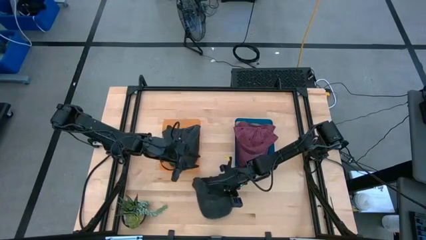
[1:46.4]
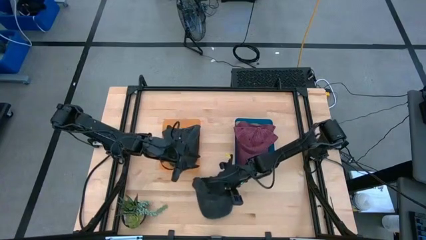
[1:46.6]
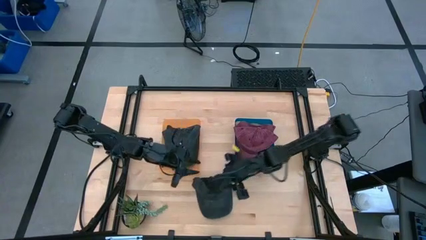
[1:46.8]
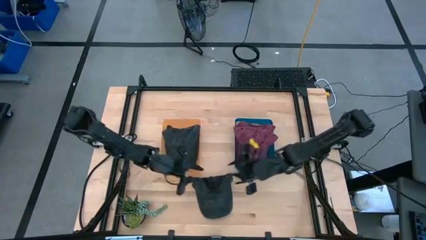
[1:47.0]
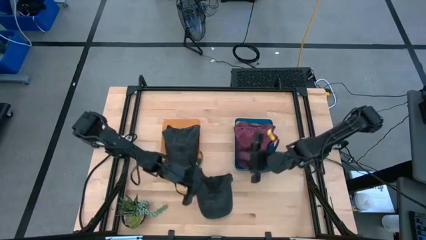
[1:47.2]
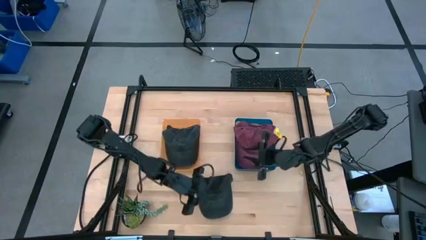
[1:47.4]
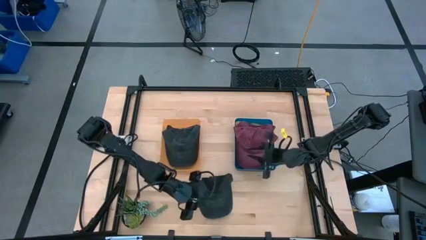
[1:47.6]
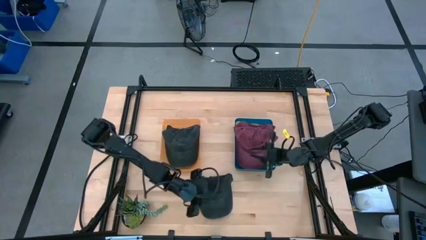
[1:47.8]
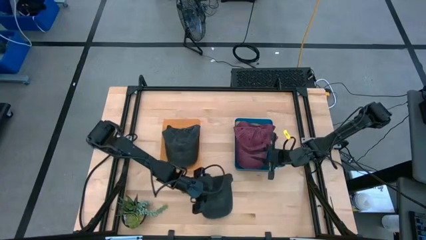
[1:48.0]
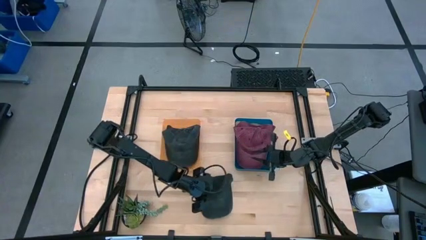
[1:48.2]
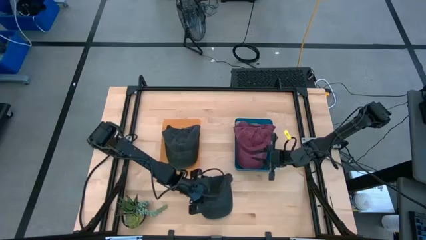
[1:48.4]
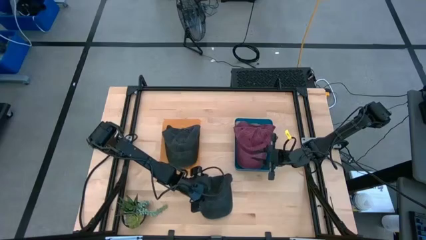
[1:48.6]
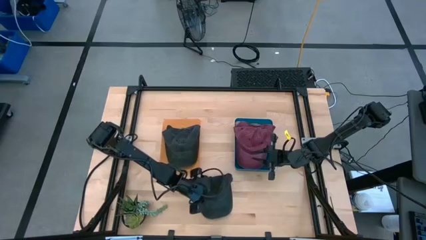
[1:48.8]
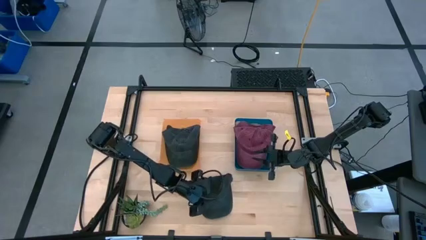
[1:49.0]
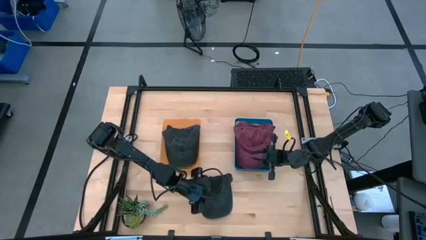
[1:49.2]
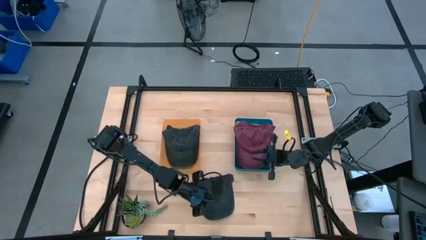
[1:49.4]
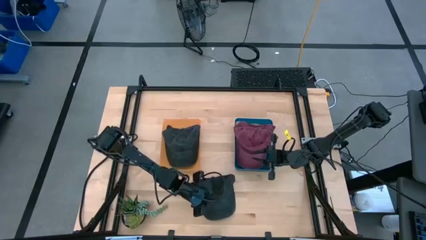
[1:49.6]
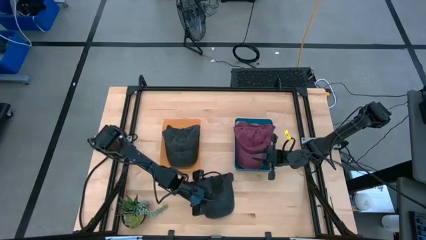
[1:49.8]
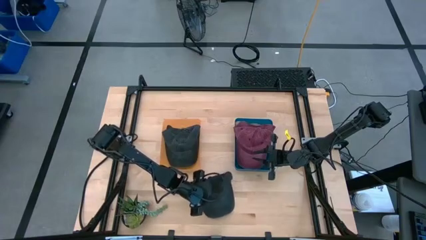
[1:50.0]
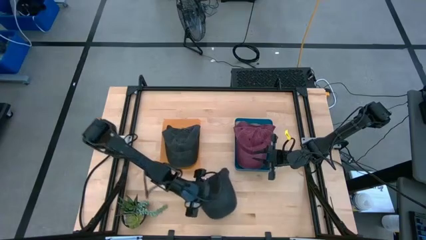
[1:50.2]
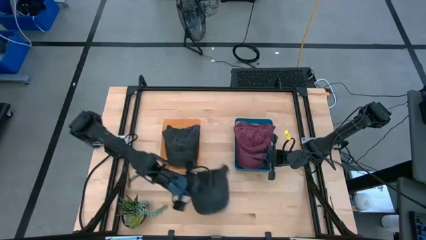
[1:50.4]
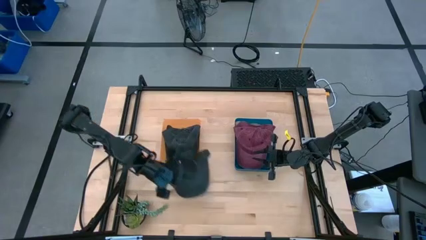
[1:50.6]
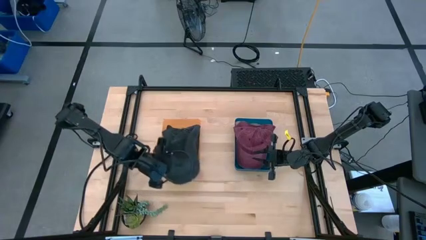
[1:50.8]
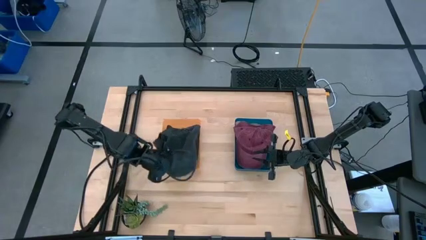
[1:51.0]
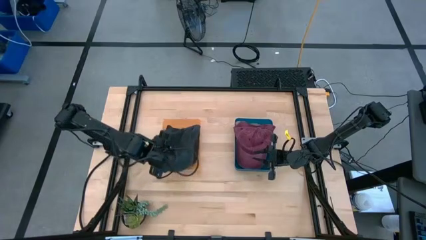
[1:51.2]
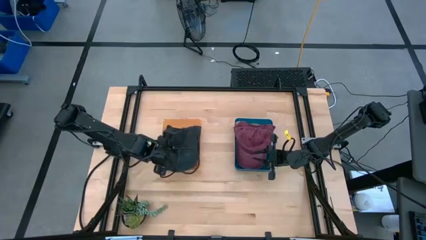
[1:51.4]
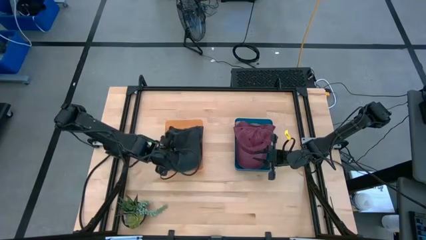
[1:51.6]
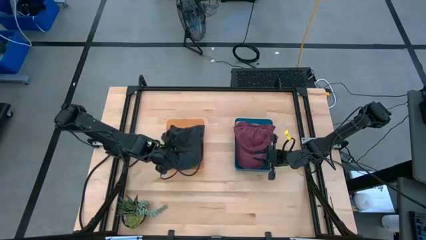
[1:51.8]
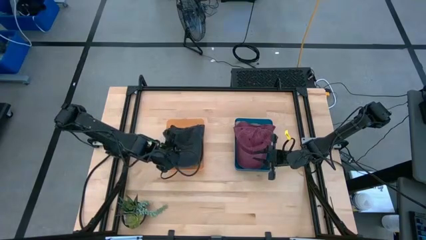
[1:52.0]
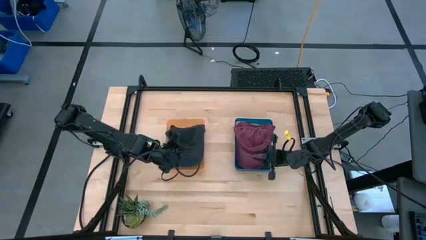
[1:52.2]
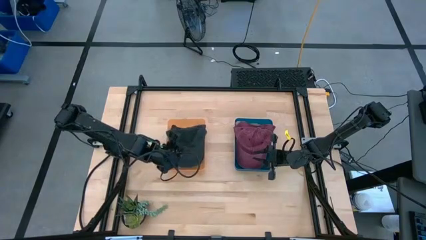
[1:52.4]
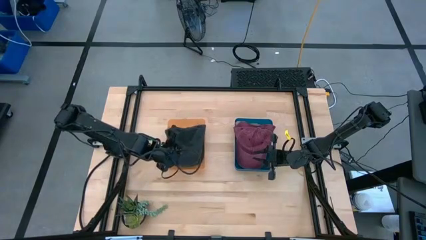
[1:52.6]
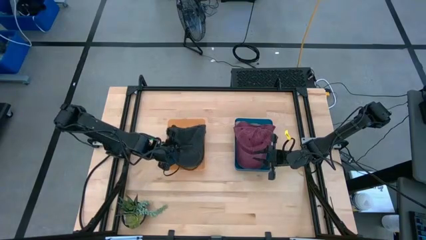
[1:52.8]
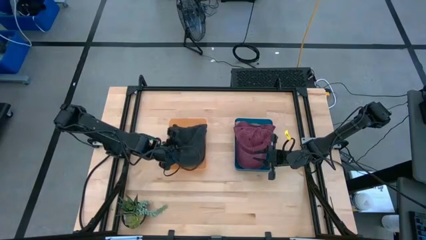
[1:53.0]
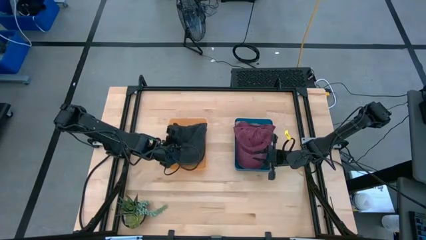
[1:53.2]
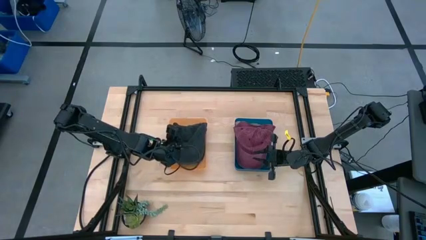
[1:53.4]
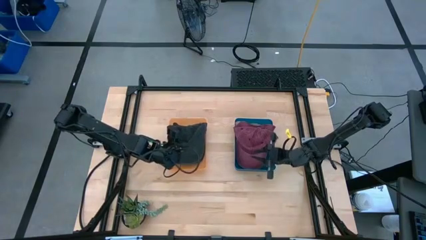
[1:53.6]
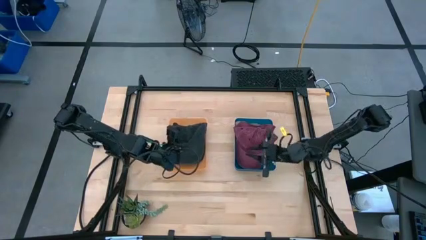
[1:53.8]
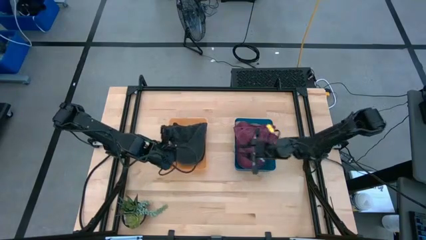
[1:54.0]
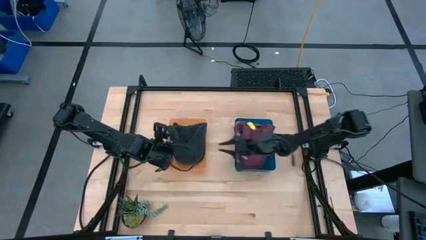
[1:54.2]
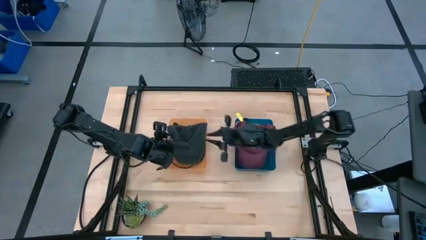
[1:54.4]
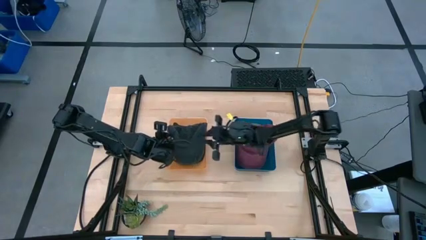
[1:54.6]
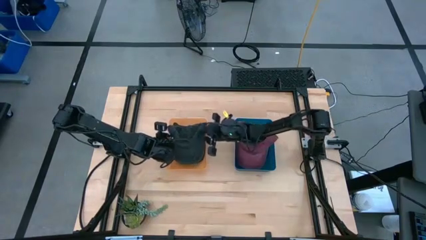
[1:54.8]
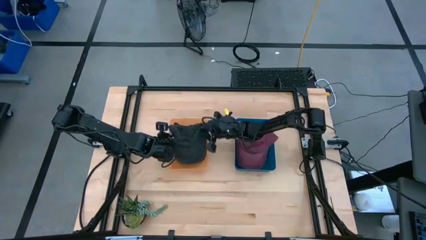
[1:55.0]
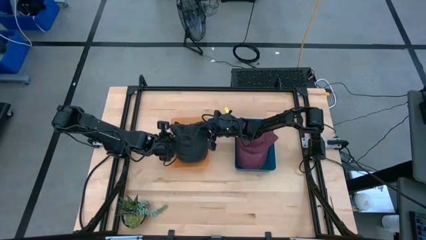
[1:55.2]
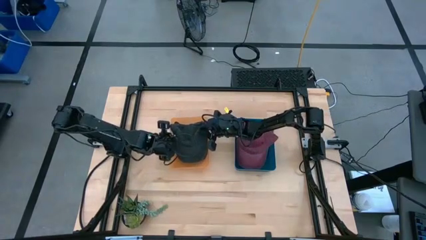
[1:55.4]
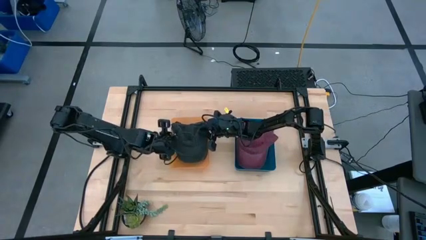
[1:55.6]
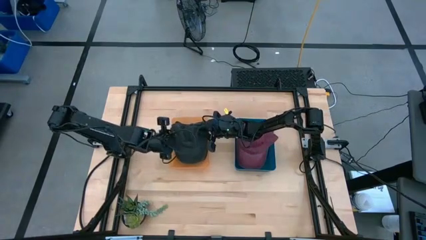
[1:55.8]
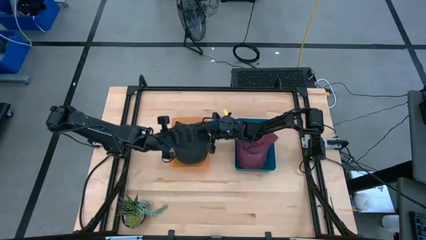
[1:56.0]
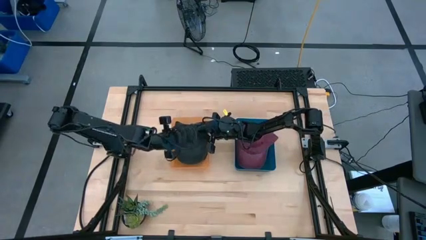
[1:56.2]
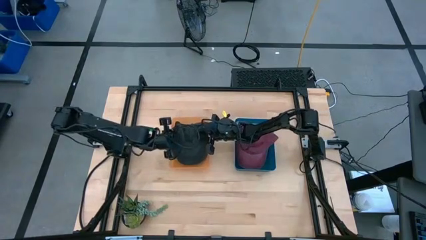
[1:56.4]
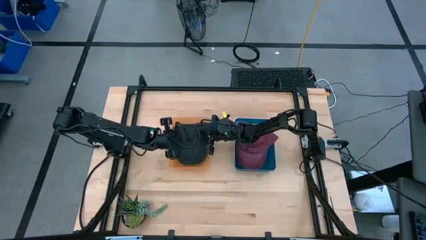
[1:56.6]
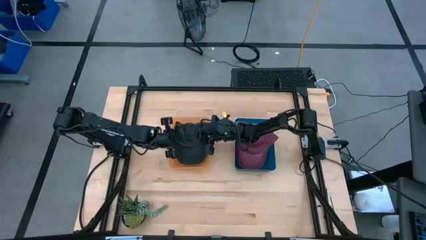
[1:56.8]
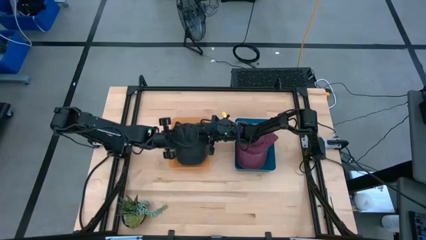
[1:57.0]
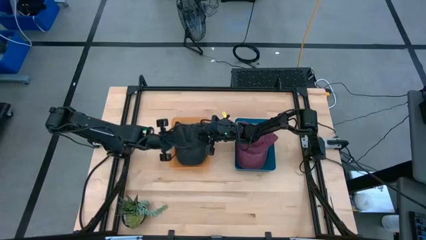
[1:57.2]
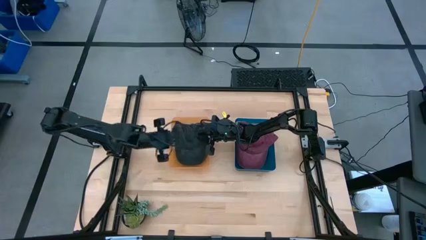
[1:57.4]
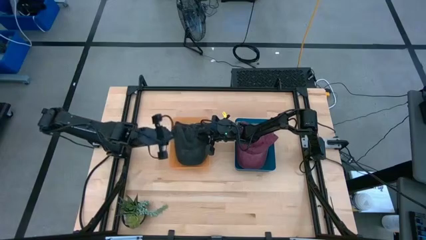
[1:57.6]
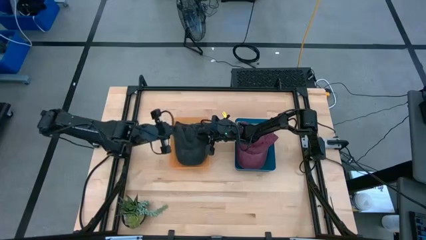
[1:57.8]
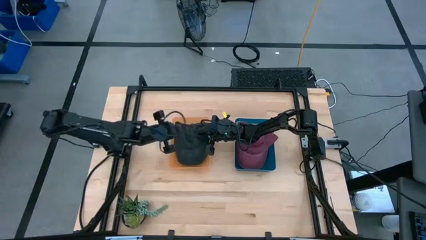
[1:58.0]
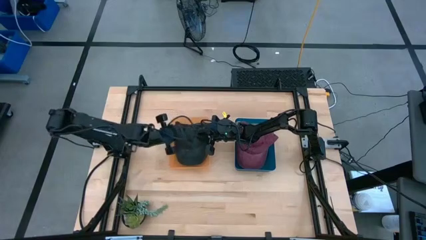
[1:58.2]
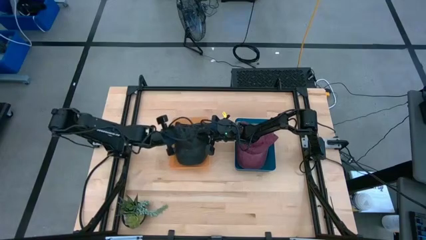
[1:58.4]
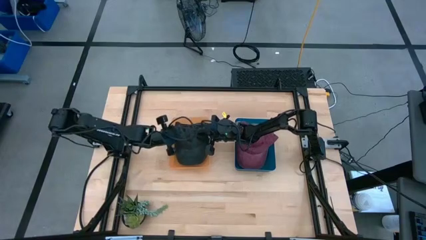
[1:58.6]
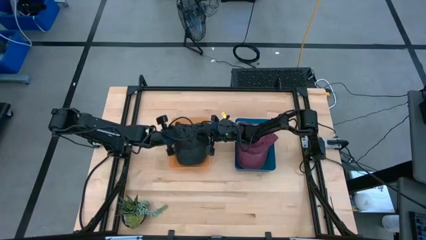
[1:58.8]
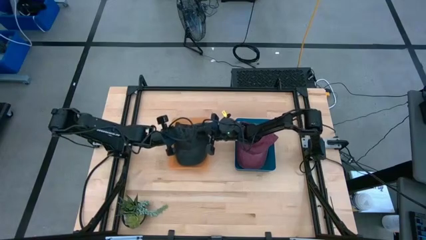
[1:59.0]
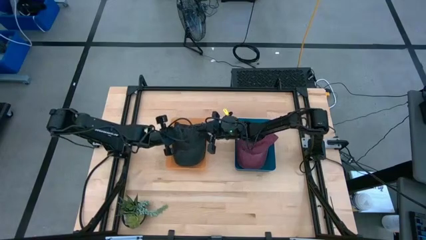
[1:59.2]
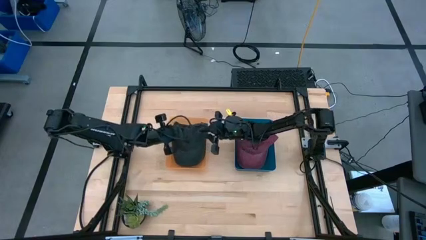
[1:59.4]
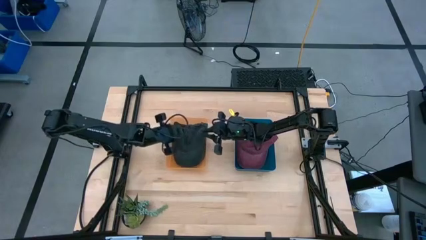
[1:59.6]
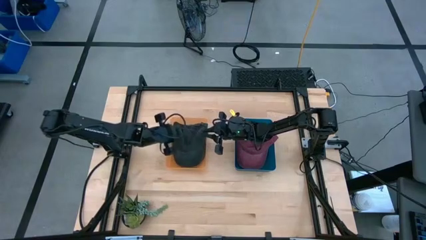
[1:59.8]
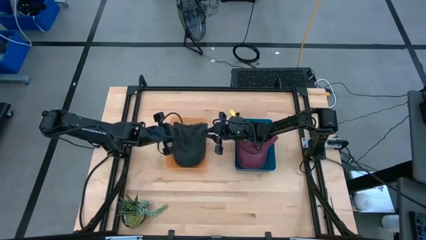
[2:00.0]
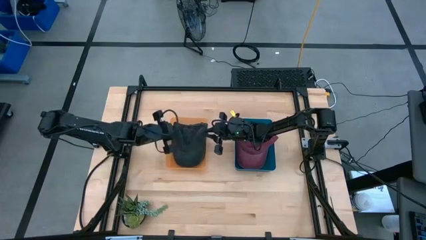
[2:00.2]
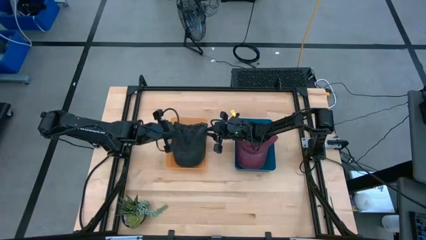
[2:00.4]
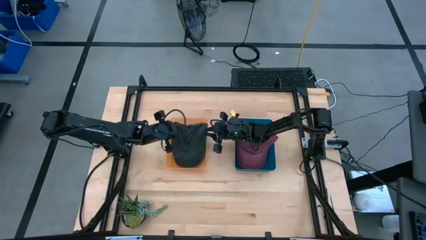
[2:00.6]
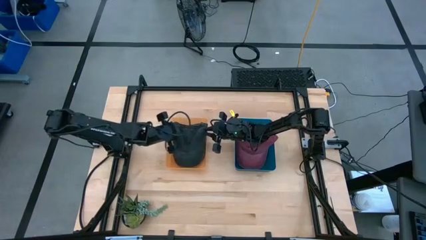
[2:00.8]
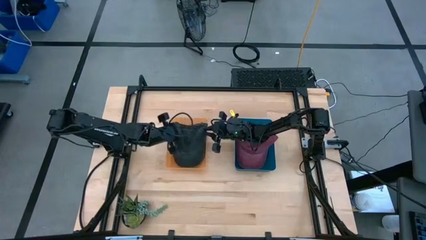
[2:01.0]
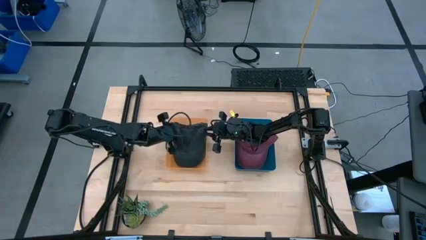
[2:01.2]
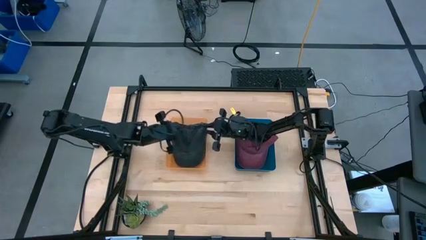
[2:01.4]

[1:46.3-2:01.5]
Task: Pick & Place hat
Put the black cap into the orange bin

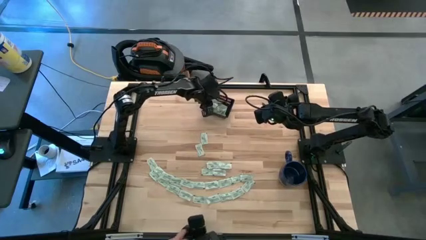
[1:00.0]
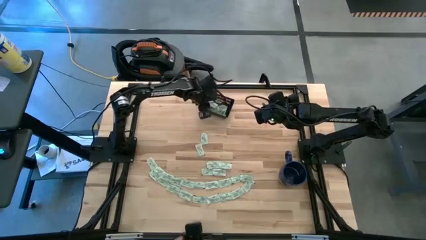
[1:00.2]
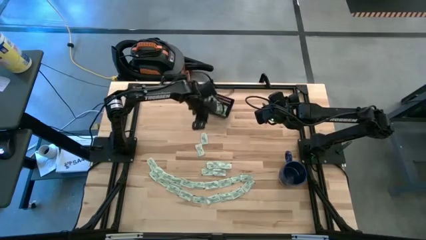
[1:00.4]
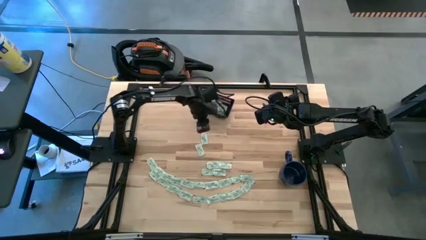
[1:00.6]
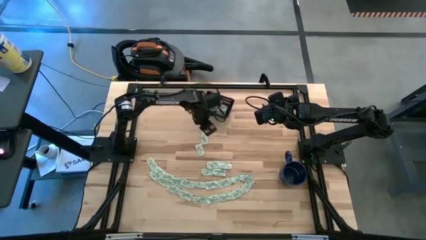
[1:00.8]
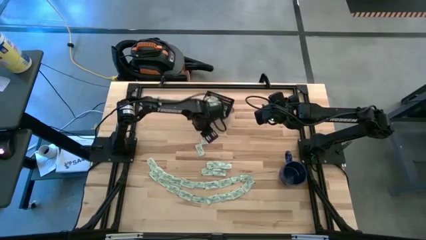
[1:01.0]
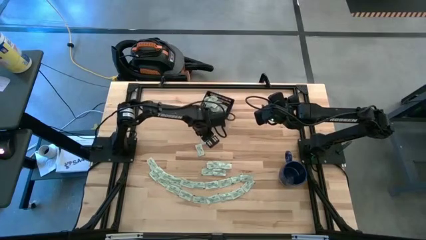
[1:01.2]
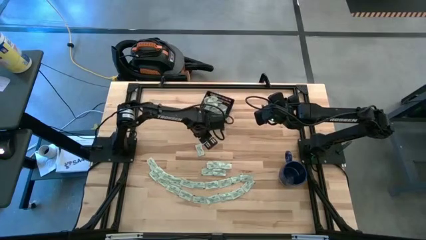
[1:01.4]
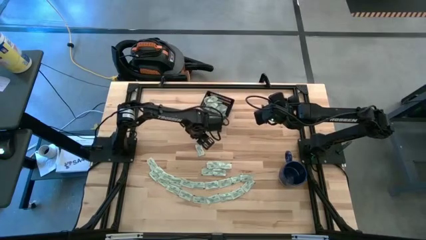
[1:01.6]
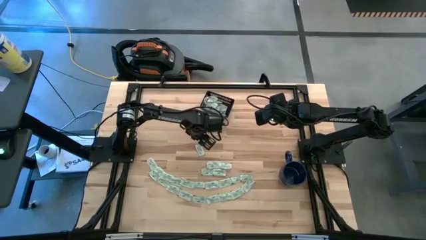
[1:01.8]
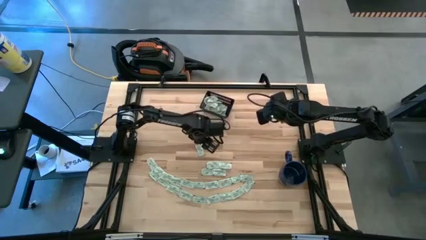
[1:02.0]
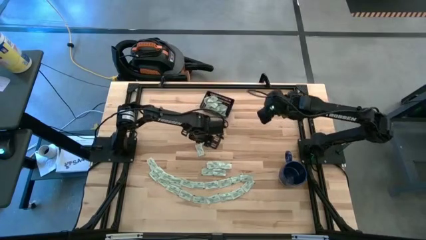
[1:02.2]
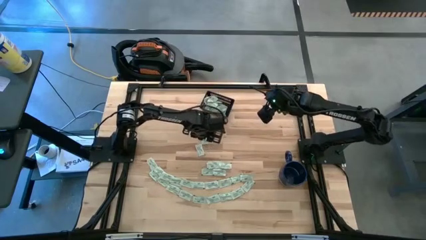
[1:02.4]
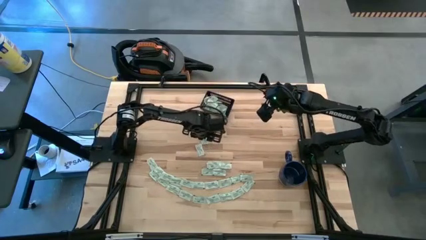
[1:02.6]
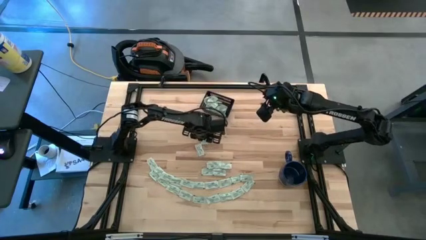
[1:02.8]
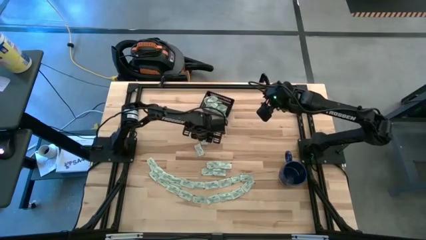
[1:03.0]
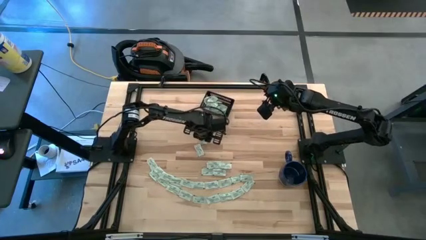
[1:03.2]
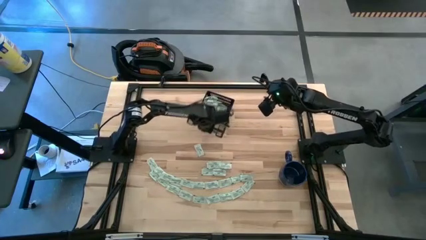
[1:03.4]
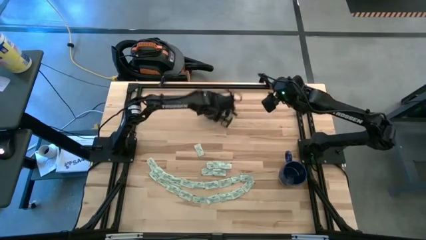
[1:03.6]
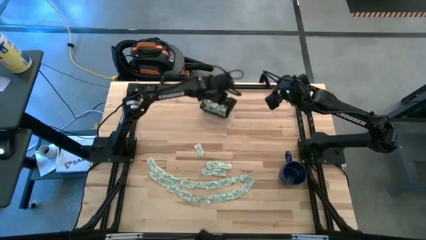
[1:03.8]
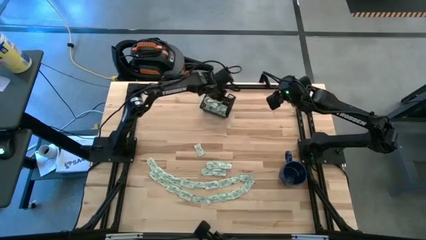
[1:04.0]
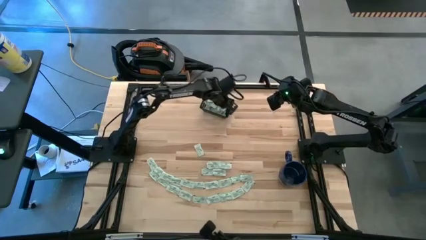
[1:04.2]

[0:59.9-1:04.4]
Task: Pick and place Stevia / Truvia into bins
Put the stevia packet into the black bin
